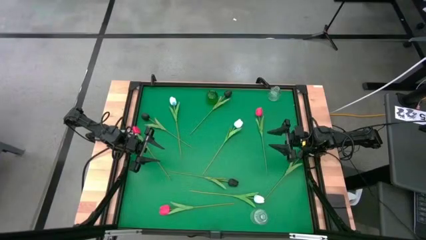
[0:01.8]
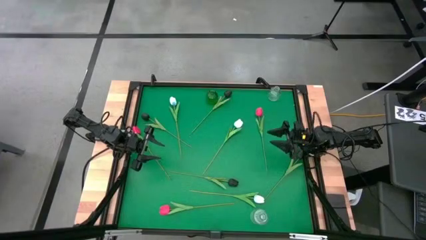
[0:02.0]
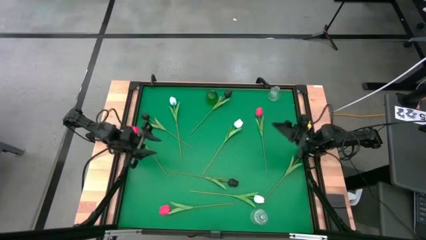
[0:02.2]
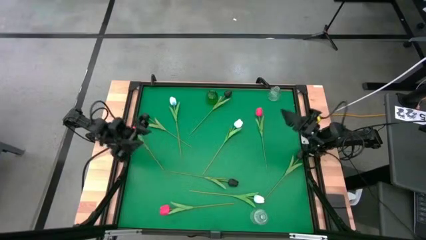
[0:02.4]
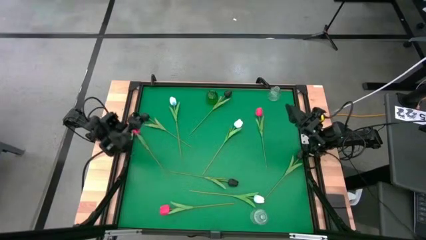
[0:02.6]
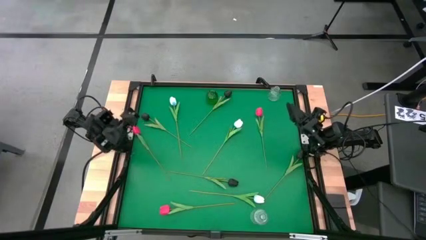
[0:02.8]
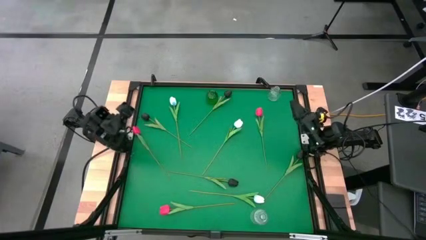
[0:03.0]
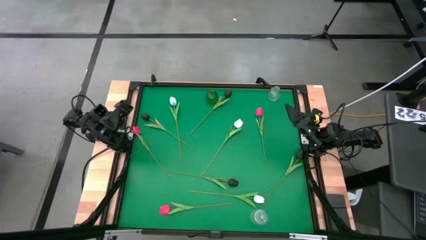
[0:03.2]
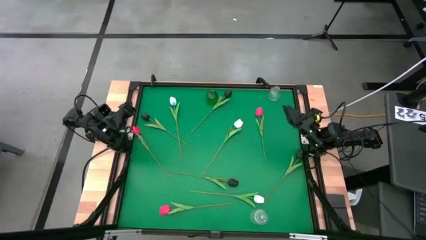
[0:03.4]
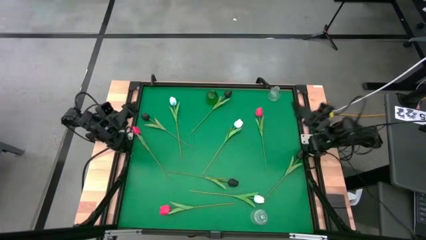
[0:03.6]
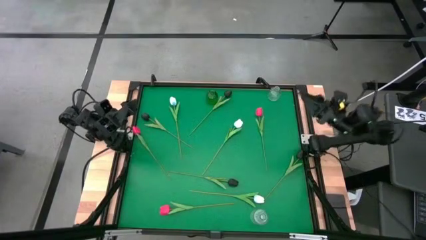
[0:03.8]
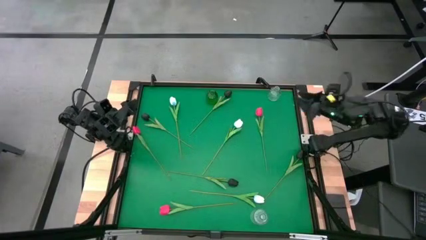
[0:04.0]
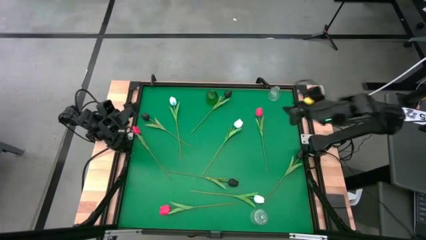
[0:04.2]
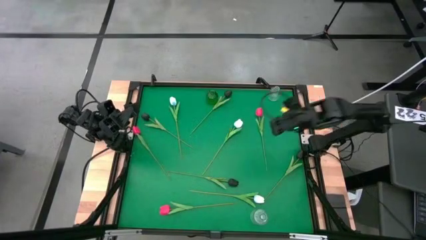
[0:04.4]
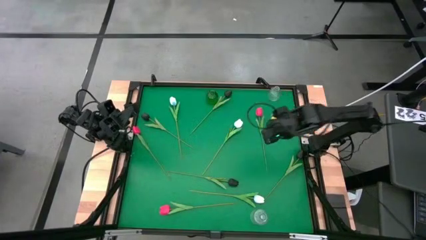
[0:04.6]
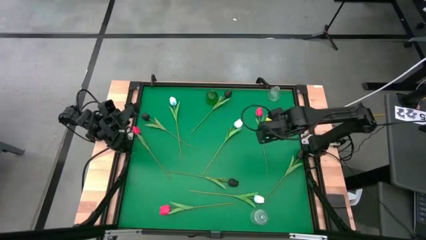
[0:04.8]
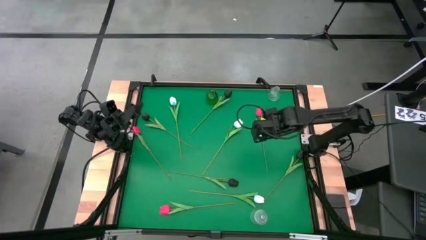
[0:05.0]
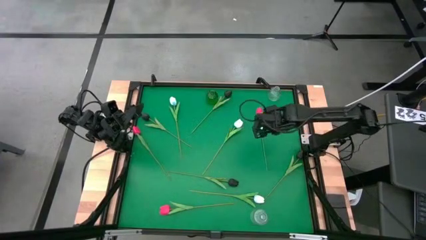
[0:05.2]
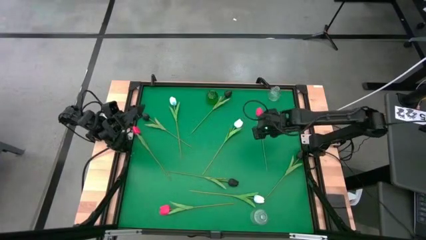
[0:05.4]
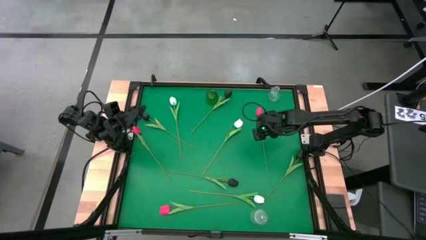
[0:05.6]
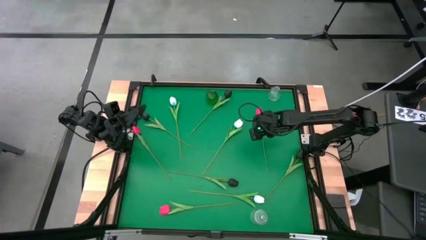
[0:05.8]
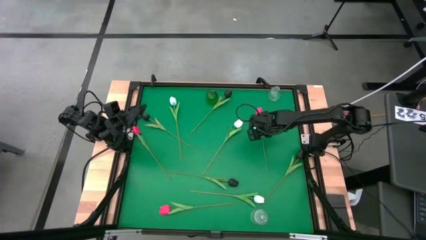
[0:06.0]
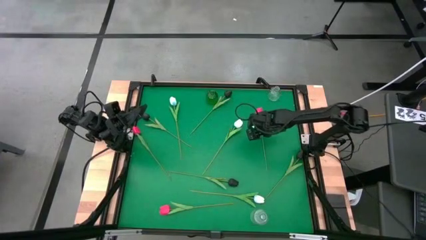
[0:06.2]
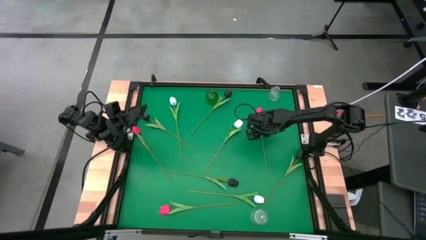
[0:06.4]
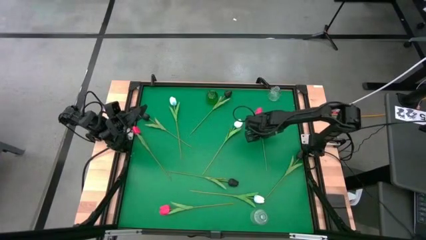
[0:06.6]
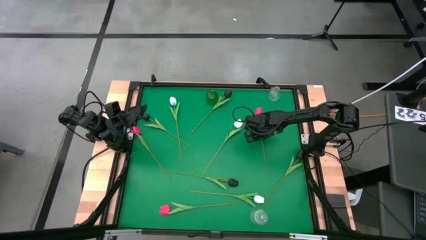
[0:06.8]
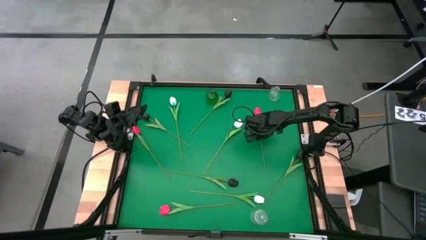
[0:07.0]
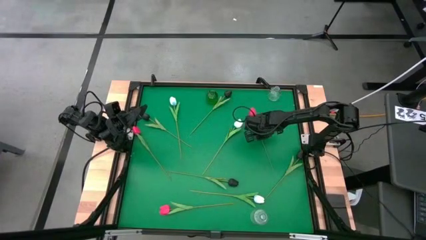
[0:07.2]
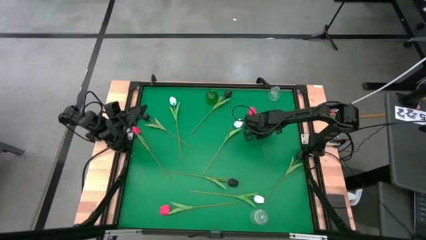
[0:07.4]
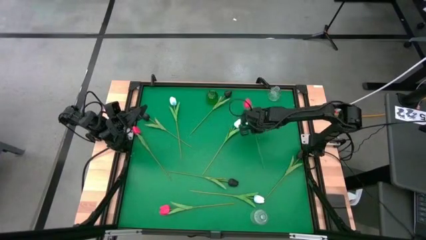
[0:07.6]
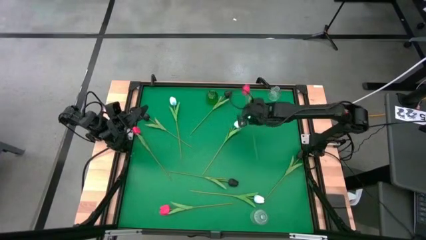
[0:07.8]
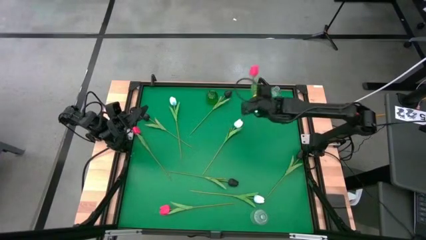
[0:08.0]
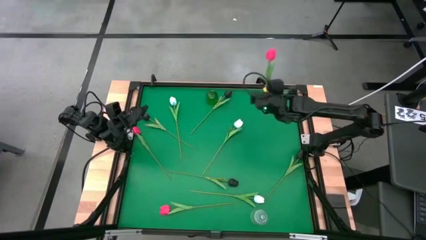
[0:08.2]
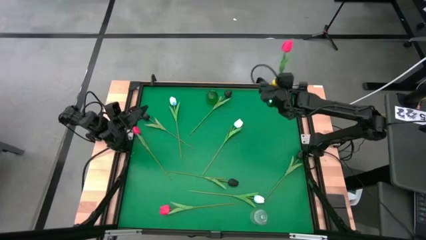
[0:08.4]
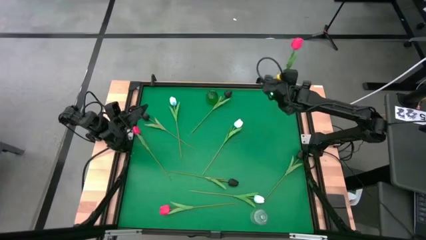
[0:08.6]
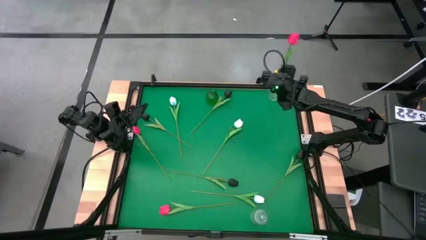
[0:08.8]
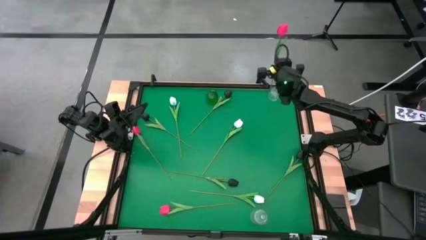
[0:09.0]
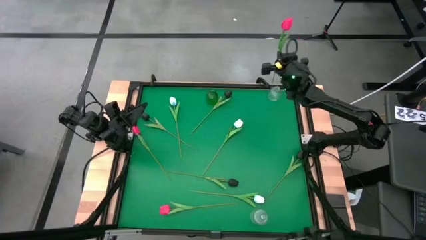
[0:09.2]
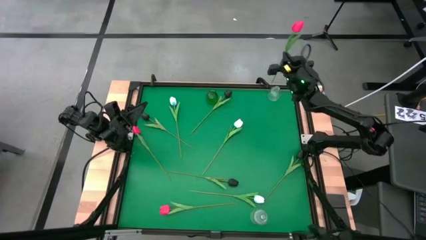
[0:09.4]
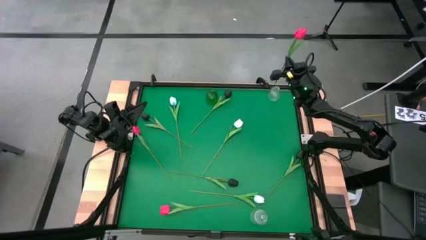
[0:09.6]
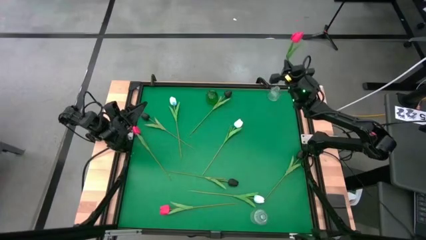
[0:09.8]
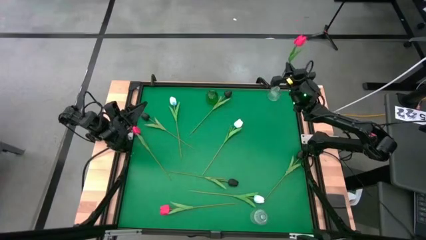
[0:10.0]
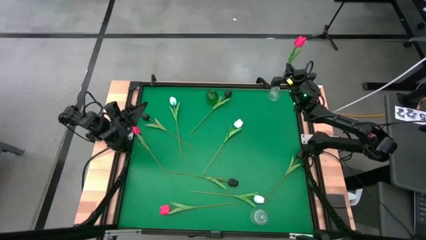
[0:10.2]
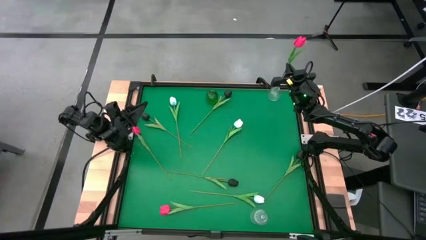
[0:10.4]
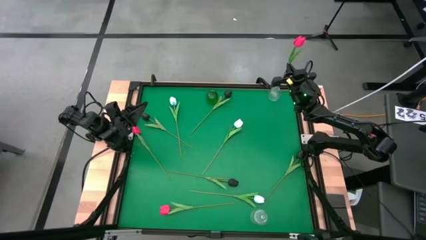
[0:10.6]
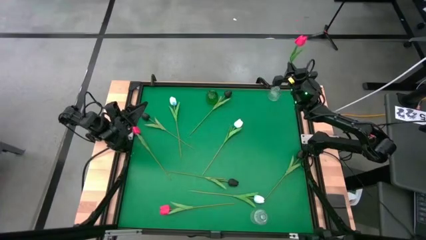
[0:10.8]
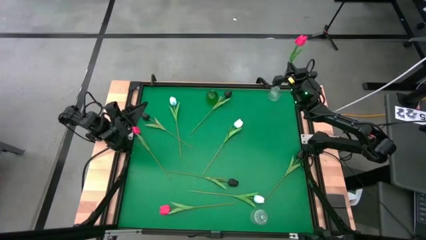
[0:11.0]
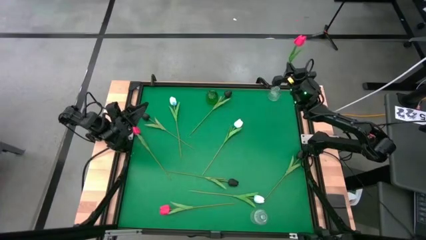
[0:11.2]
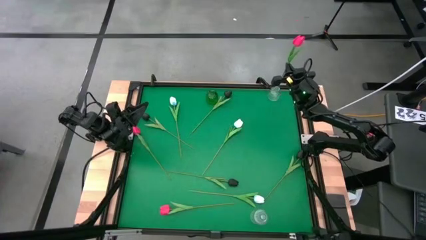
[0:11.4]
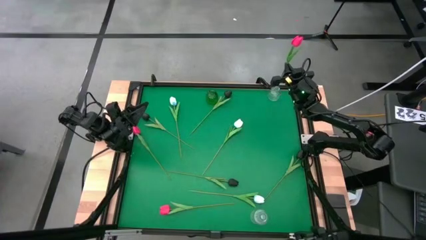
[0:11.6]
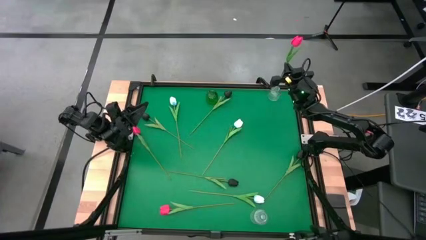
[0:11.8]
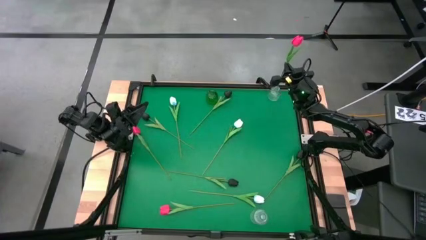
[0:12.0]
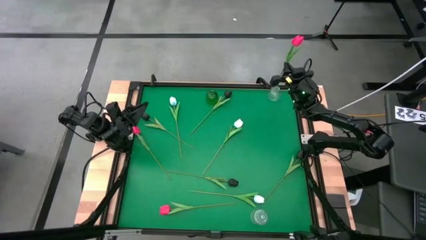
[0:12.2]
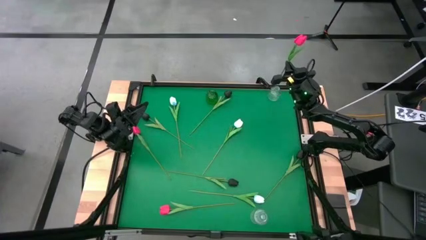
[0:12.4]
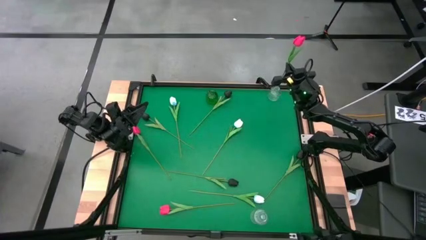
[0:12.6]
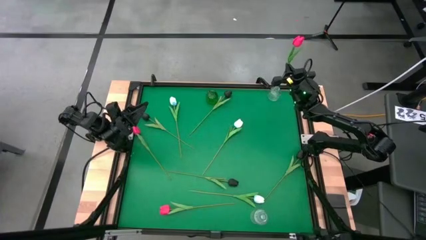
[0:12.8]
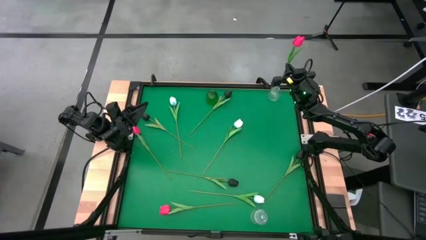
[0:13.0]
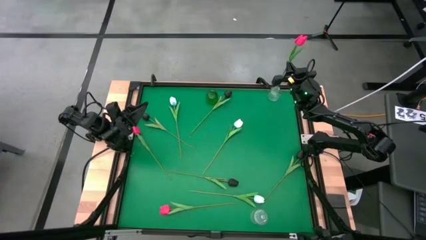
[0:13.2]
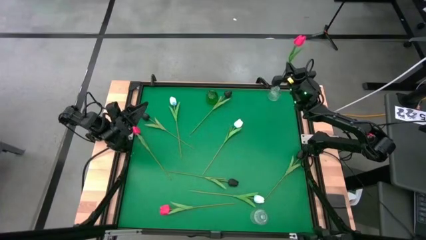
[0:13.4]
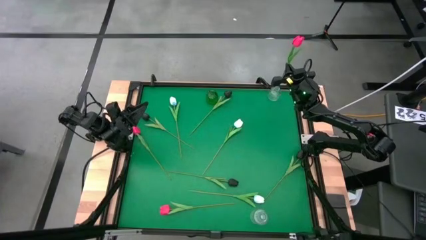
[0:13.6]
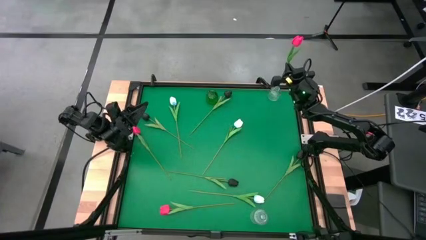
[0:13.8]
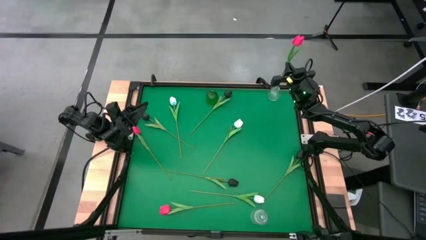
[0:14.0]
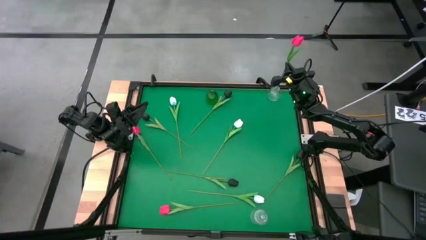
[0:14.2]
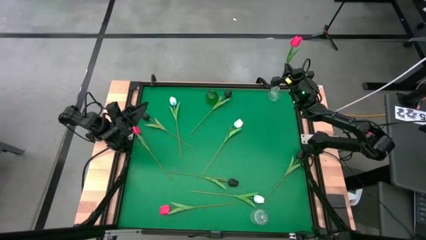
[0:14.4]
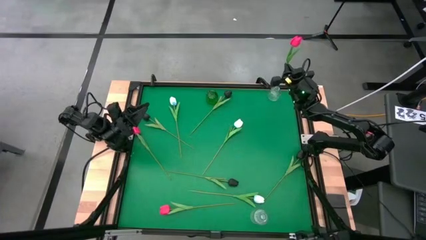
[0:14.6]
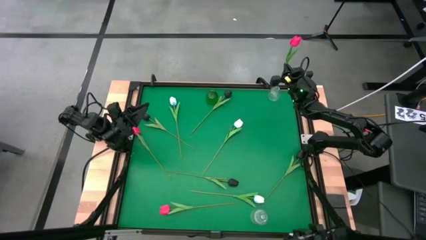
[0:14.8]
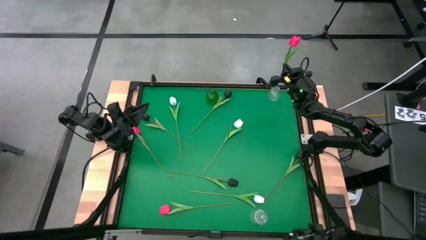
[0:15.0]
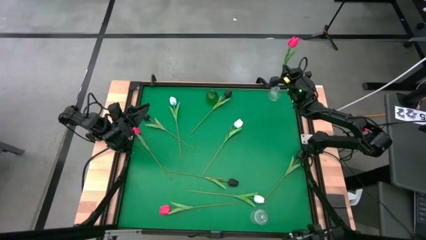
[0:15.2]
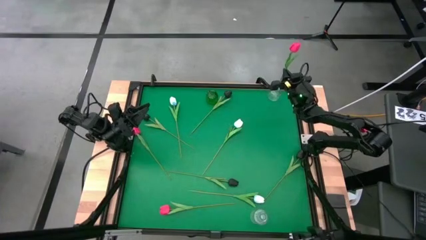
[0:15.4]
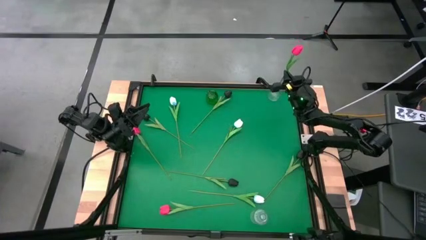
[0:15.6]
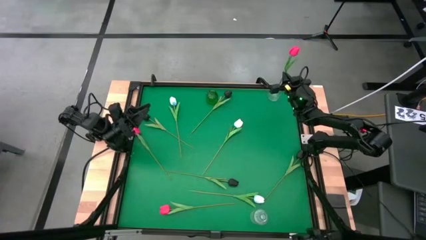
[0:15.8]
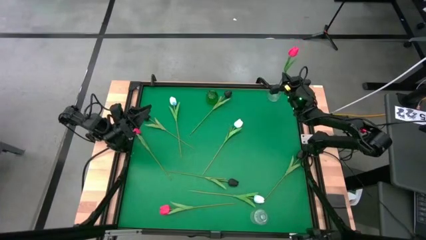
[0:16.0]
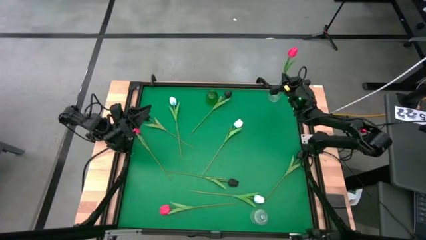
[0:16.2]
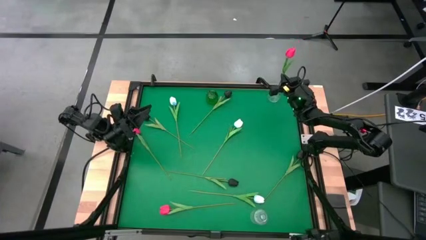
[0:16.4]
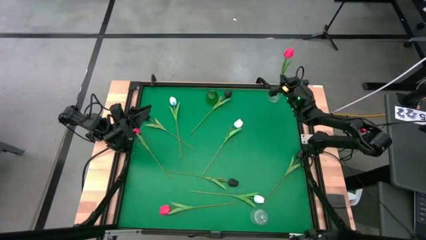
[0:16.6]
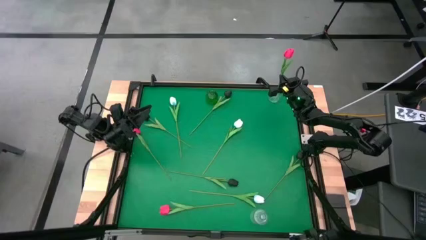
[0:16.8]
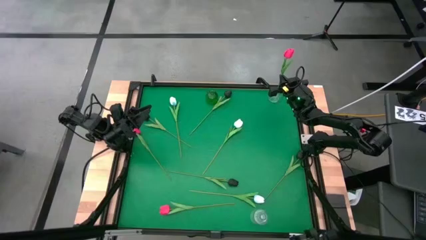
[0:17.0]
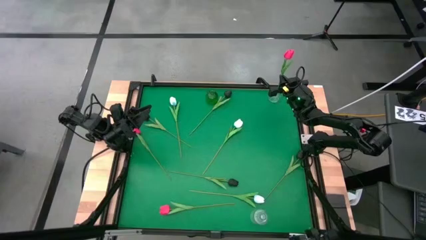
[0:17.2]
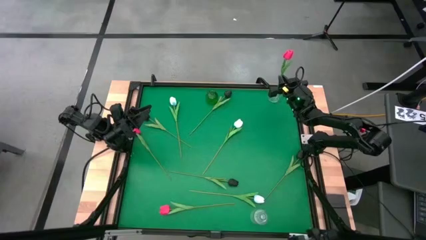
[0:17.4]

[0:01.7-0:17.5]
Task: Sort flowers into vase by color
Put the pink tulip into the top transparent vase
